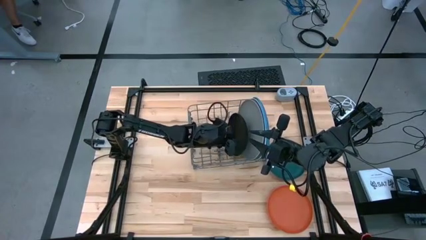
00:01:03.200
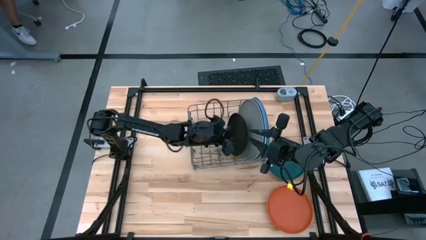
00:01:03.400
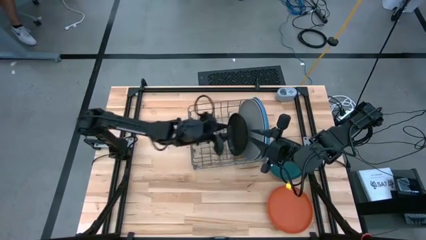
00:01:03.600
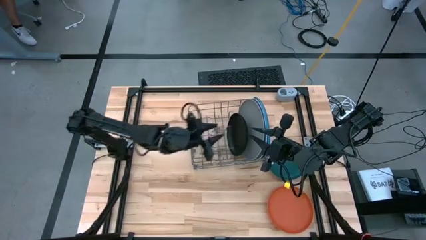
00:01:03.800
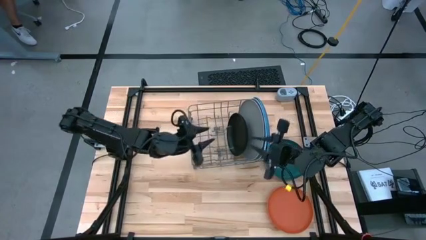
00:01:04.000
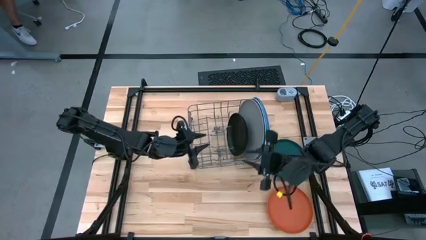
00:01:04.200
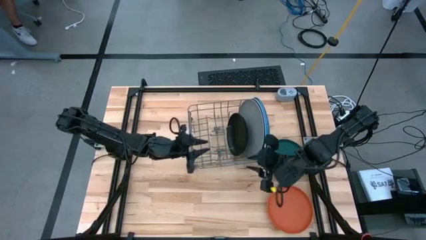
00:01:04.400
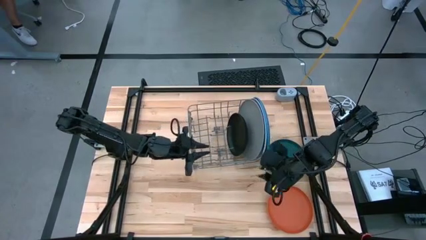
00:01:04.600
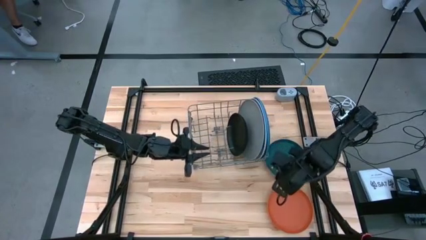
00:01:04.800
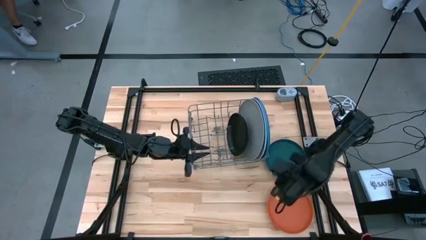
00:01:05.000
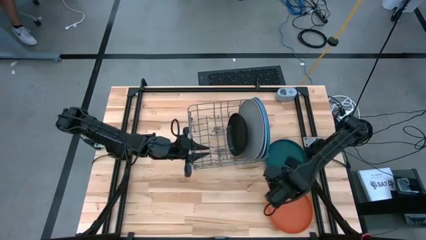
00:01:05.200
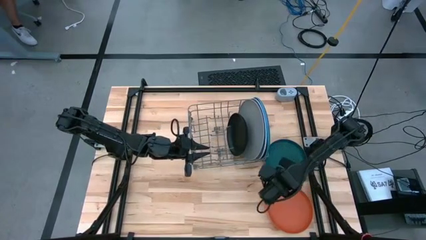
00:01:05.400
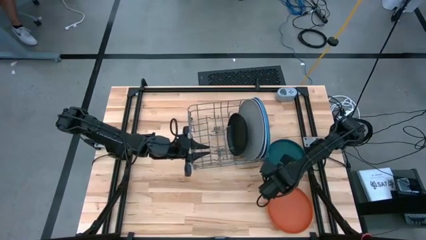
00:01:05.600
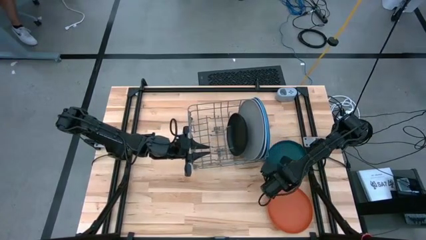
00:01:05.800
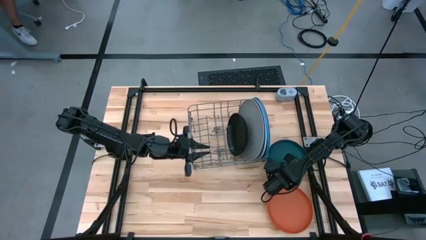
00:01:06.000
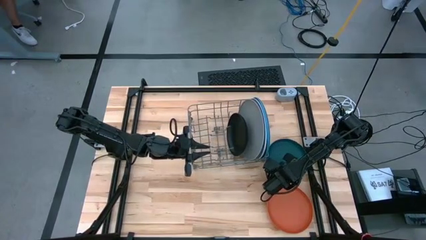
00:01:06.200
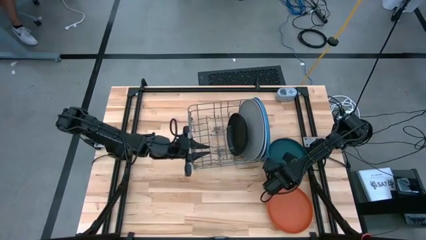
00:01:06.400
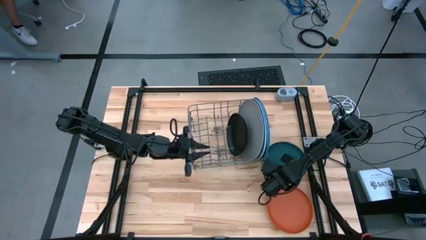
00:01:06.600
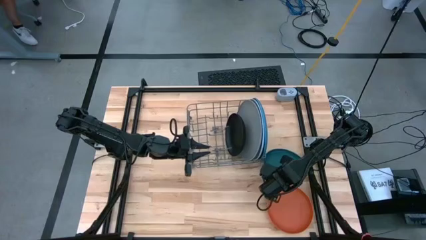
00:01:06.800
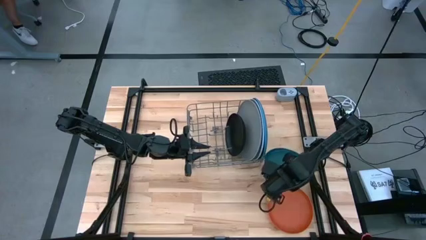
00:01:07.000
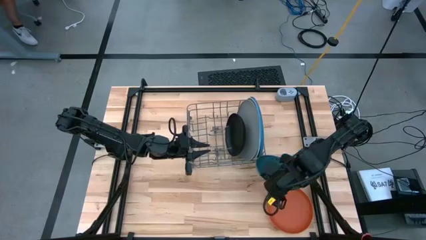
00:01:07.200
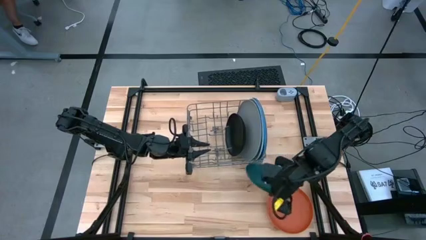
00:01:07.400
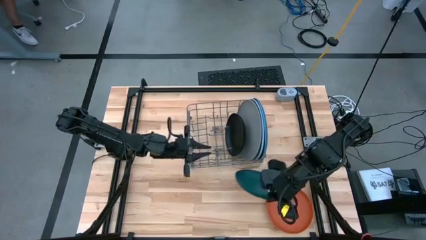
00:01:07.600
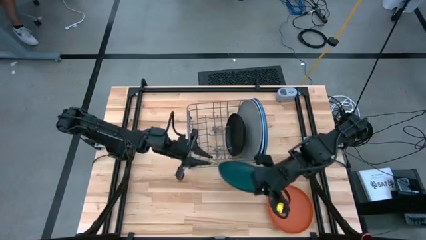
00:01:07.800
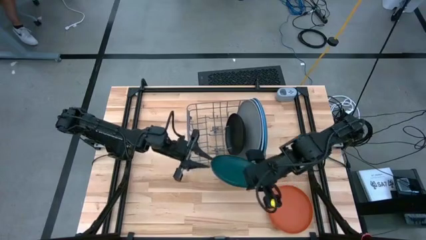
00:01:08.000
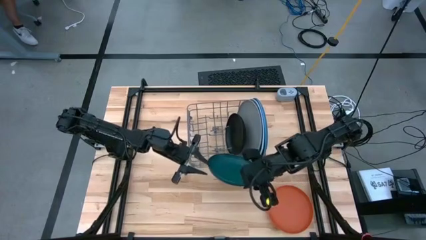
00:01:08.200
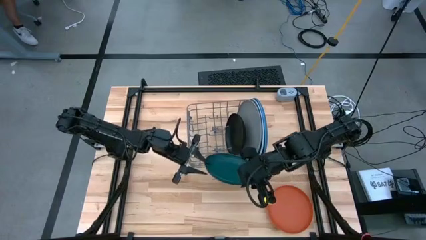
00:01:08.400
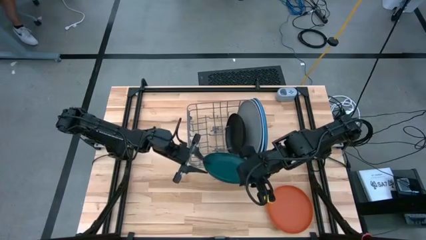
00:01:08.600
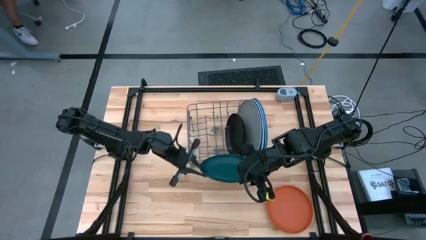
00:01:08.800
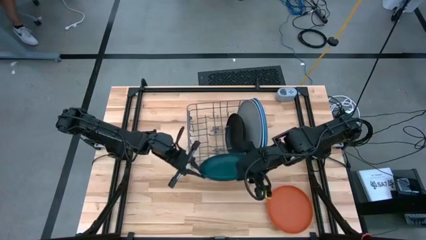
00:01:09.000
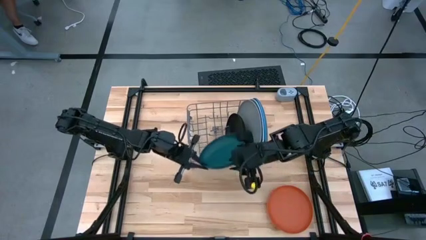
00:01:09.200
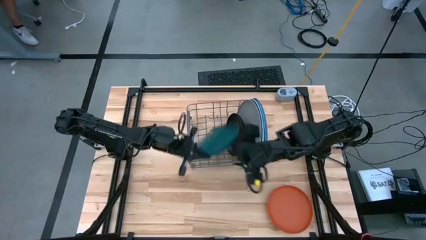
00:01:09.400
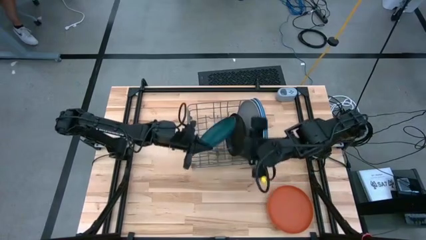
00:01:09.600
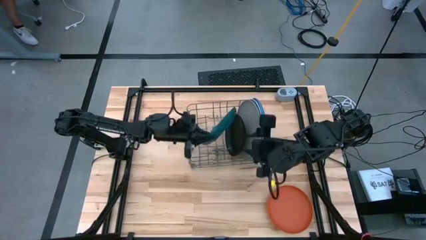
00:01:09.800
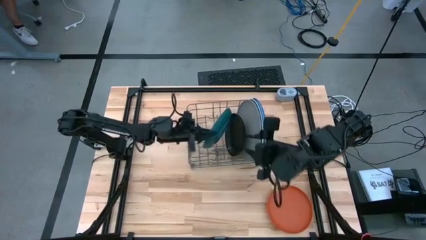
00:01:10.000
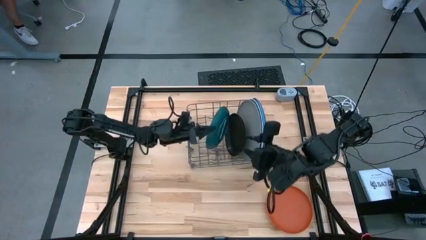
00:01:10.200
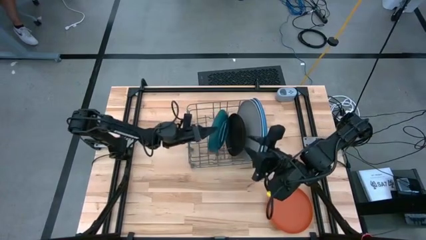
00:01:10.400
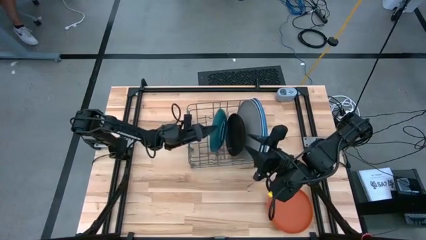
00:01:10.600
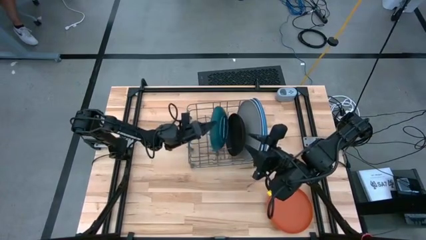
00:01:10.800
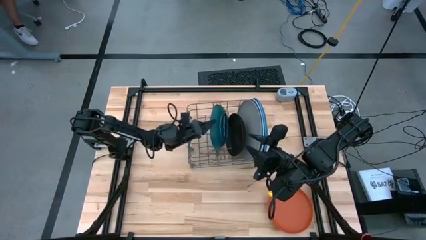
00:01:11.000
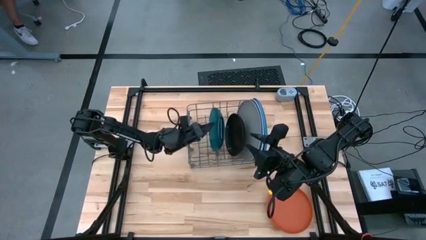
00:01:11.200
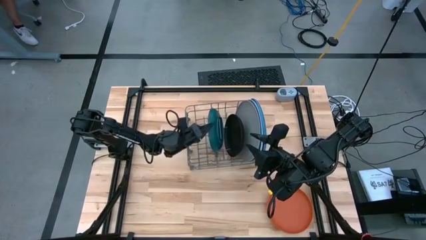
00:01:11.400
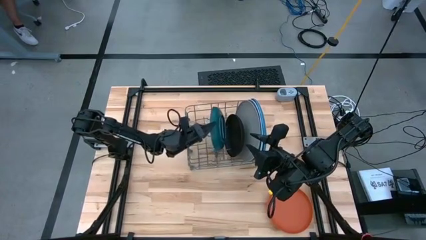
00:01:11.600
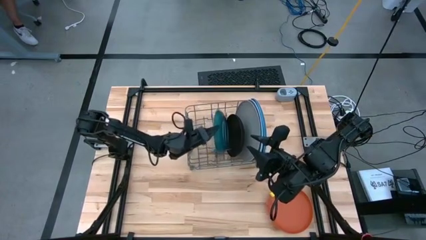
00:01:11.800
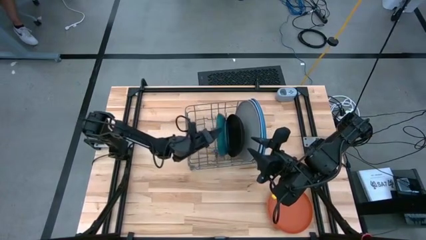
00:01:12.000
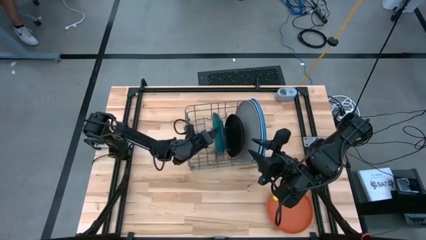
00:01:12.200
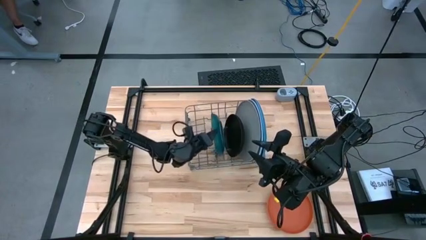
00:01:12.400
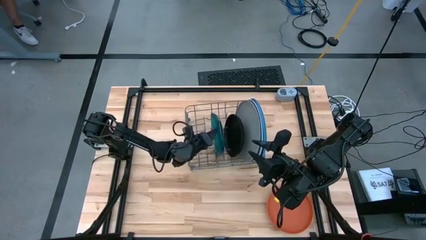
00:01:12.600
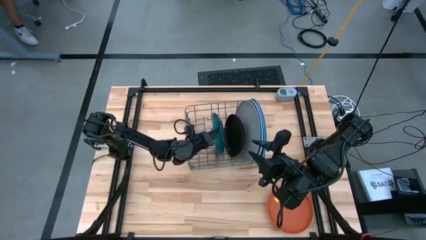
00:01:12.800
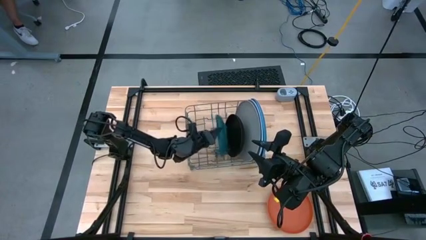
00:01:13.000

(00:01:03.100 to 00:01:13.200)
Task: Sort dishes
Put the dark green plate into the dish rack
